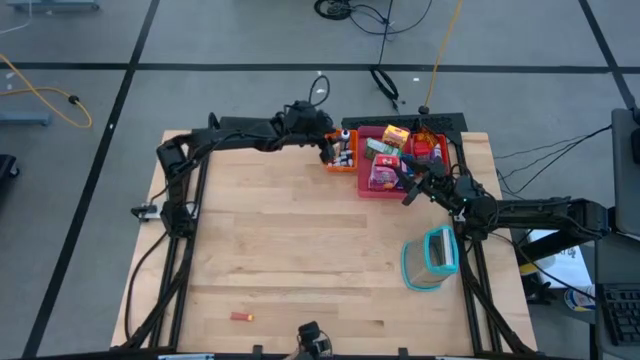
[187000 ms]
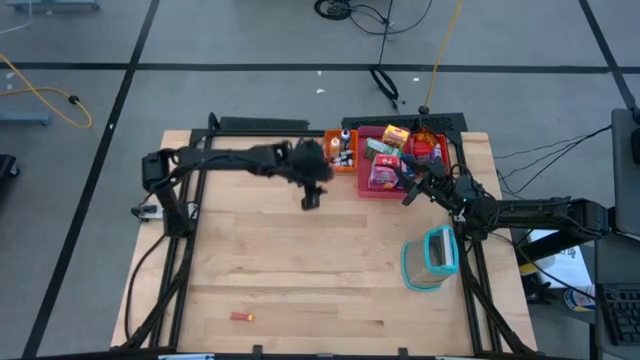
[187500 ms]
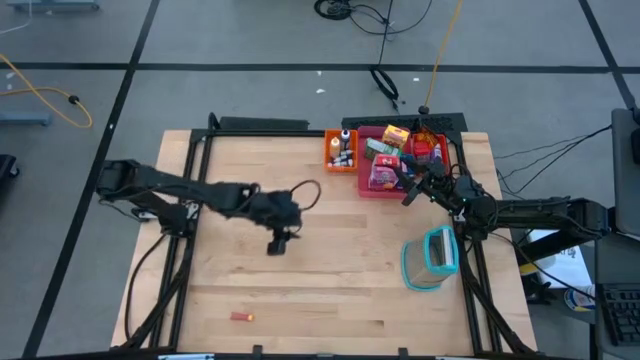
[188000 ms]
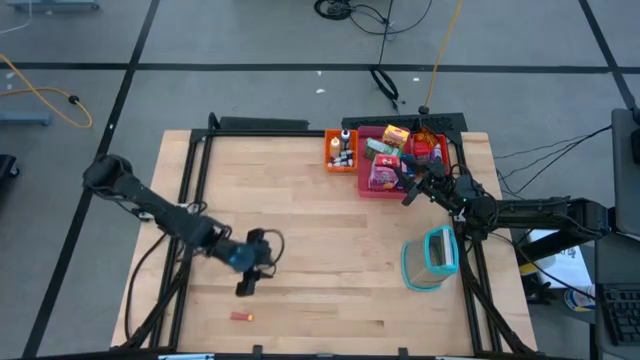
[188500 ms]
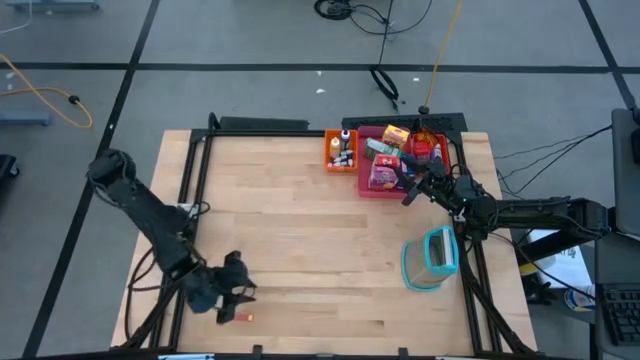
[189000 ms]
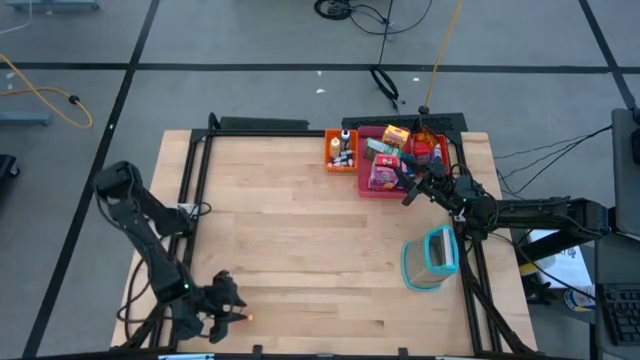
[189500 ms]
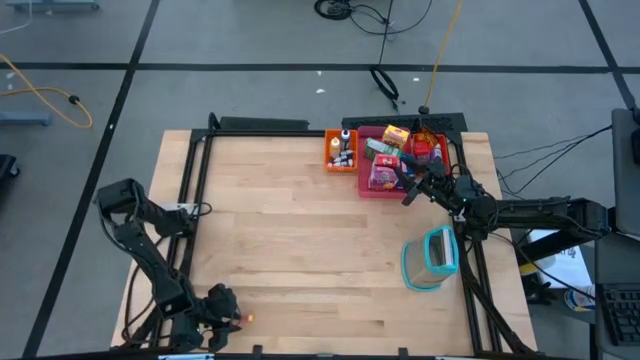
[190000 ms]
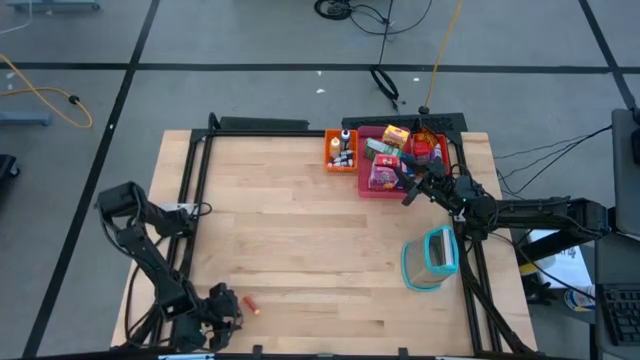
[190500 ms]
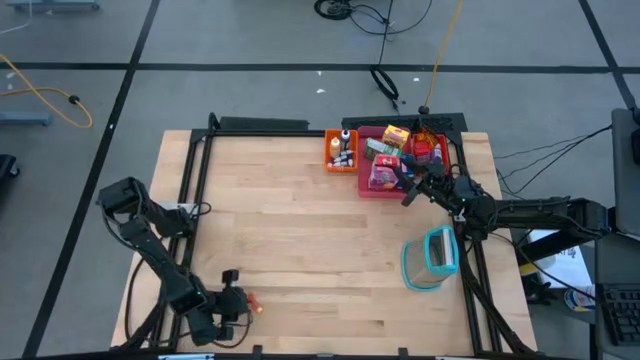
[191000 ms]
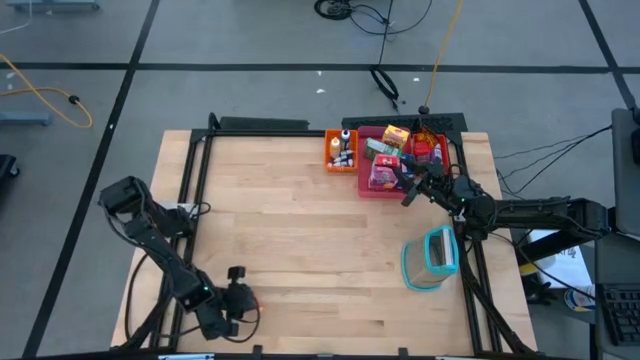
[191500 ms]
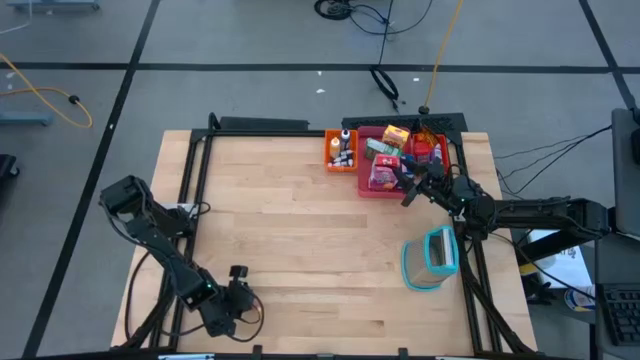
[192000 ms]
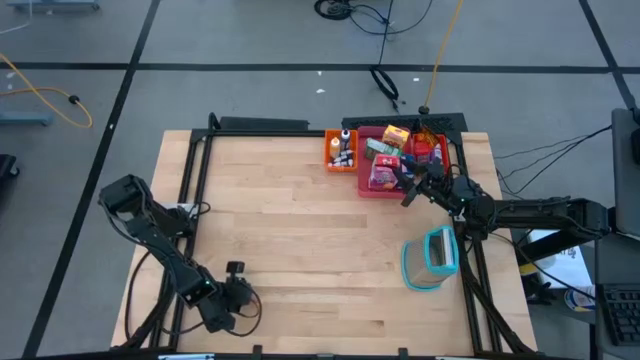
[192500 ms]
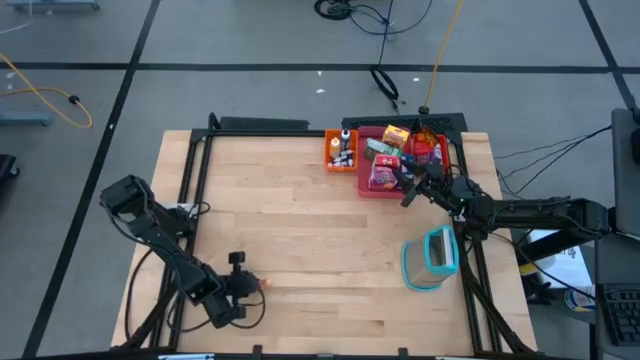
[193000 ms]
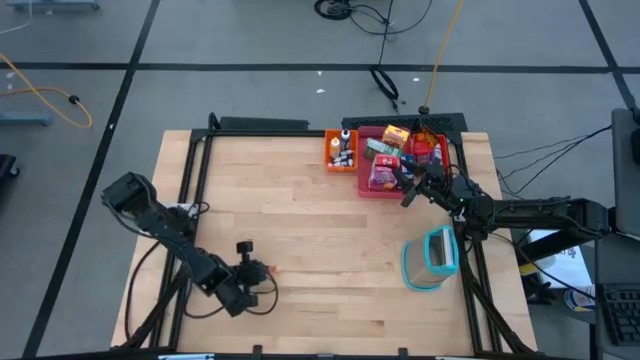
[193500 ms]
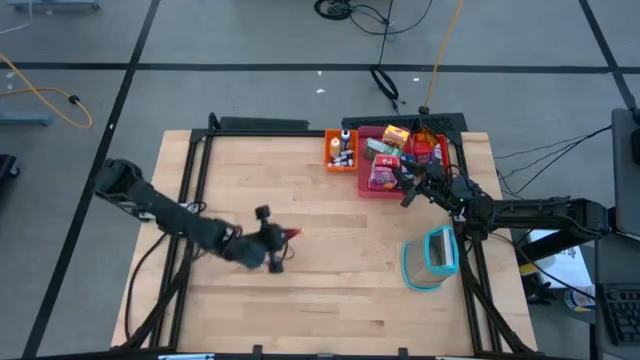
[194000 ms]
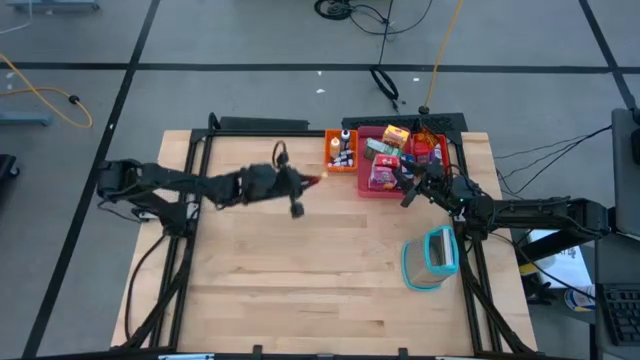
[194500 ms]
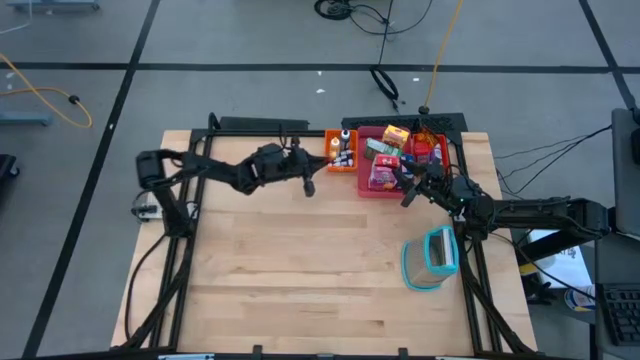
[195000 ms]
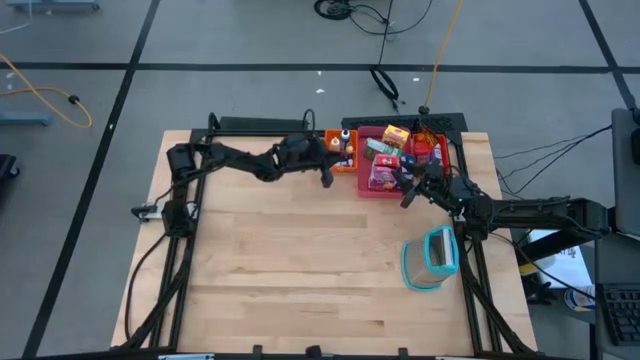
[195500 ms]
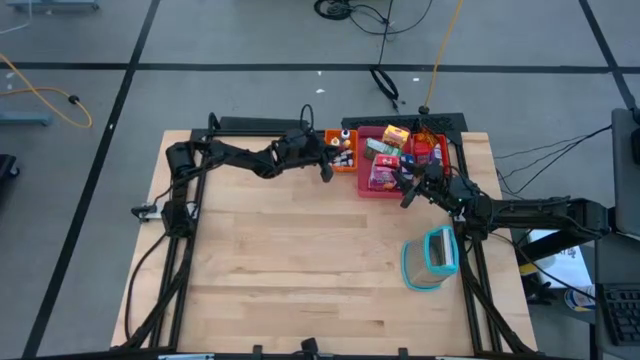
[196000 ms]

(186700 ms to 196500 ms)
Task: Pick & Place Kitchen Items
Put the red food coloring bottle into the orange bin

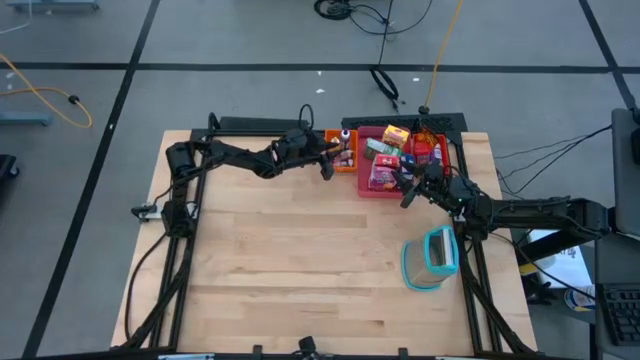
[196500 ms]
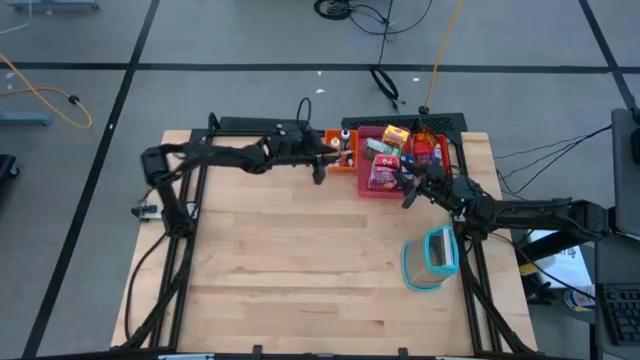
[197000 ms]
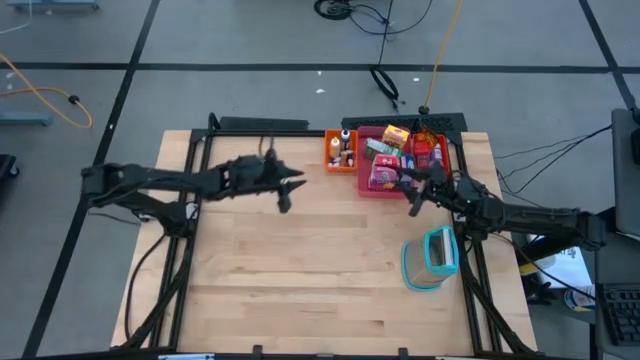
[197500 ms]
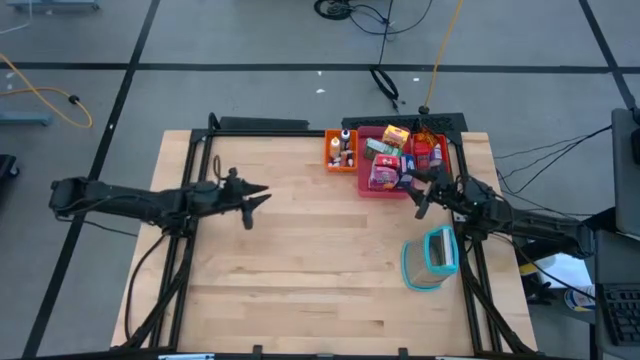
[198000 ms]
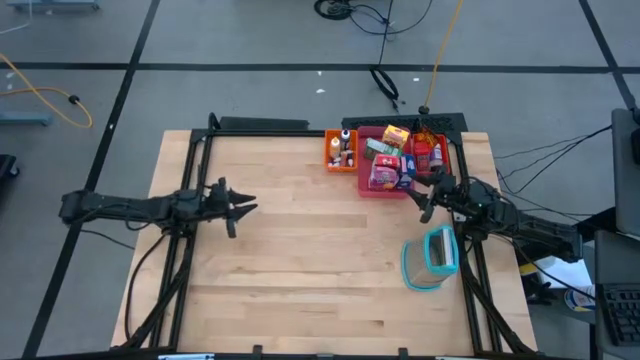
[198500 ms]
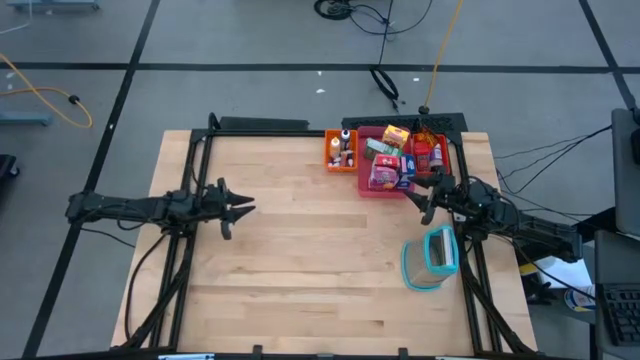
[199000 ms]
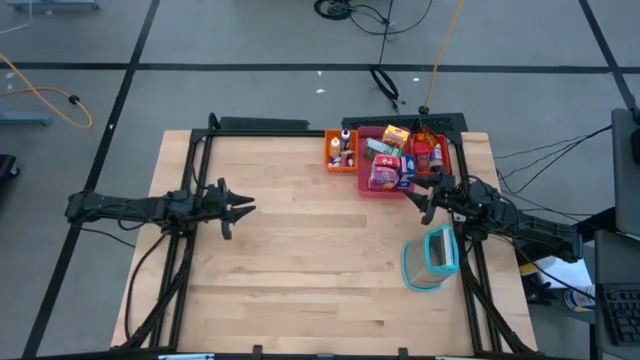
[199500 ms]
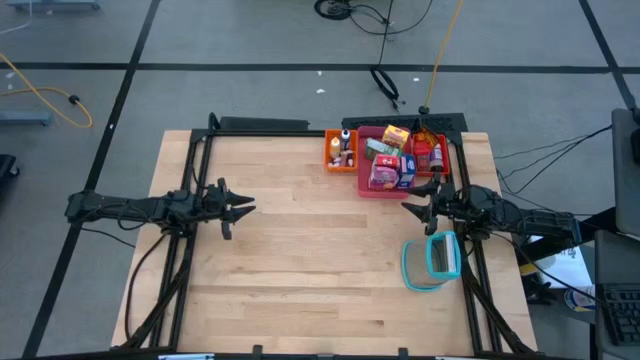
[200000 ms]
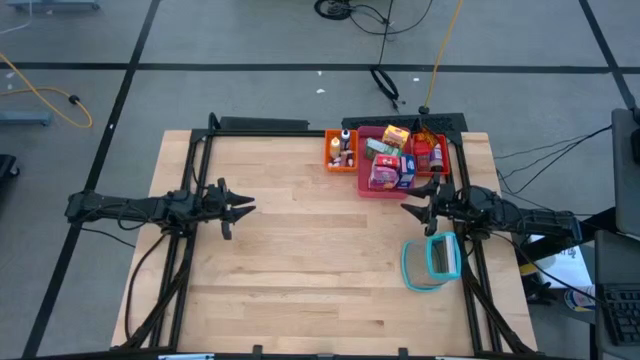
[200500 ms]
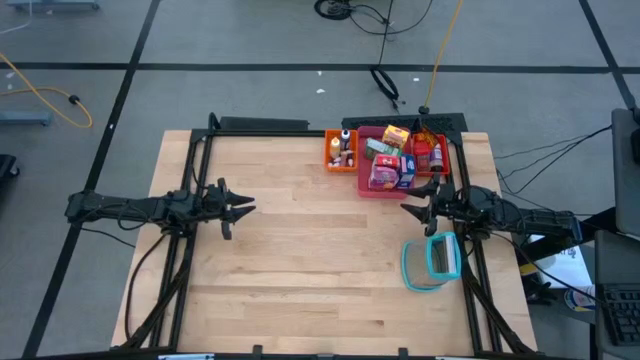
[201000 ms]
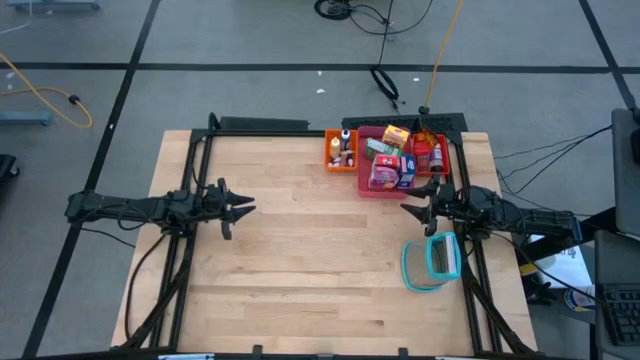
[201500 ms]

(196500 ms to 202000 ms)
Return to Home Position

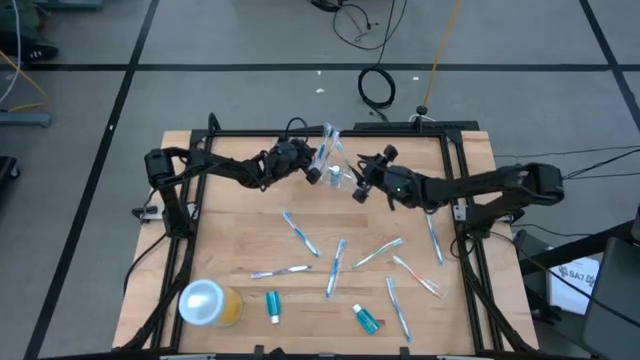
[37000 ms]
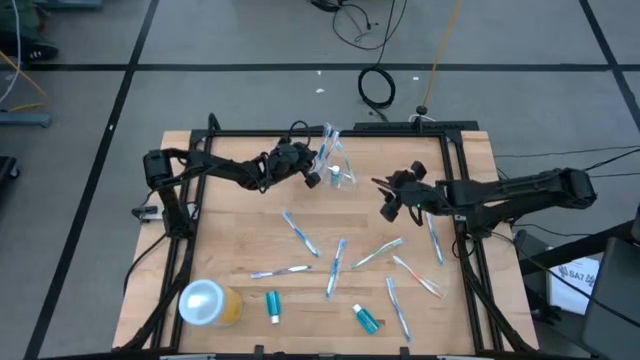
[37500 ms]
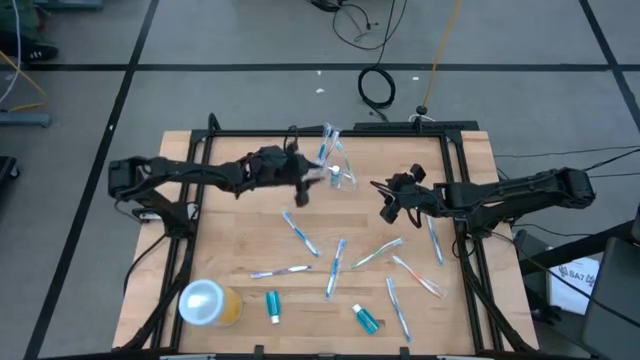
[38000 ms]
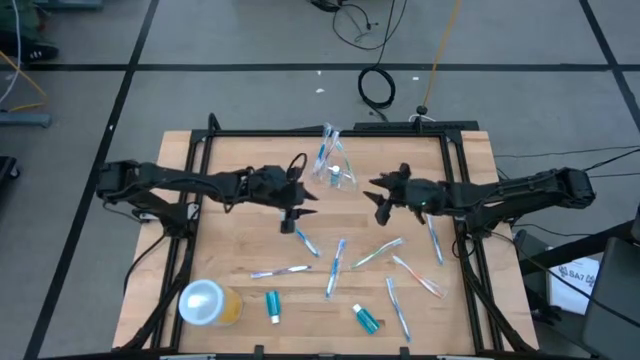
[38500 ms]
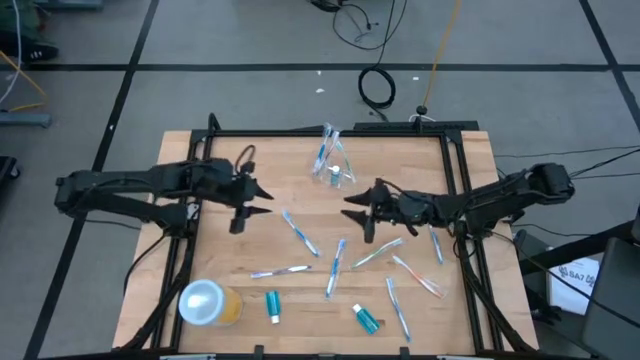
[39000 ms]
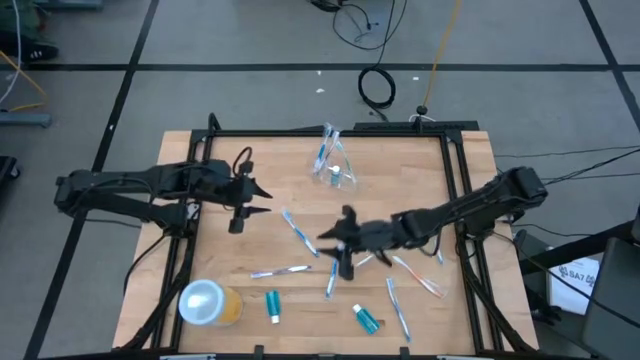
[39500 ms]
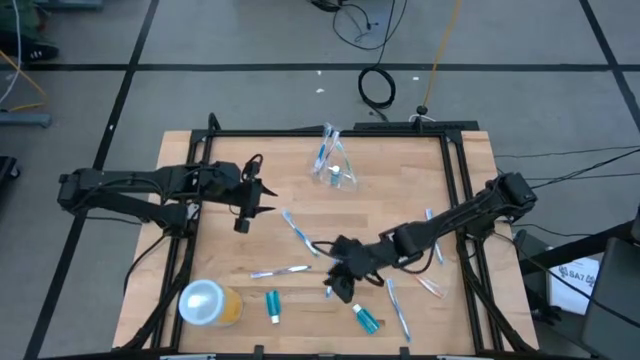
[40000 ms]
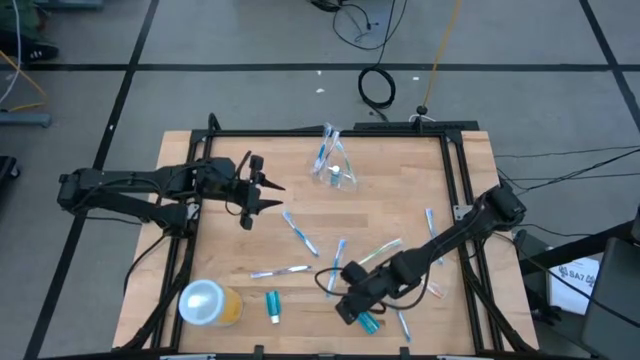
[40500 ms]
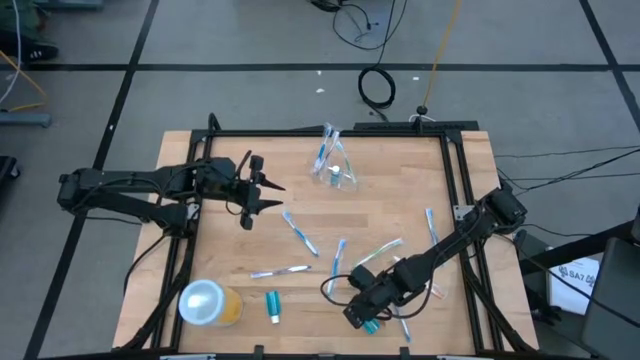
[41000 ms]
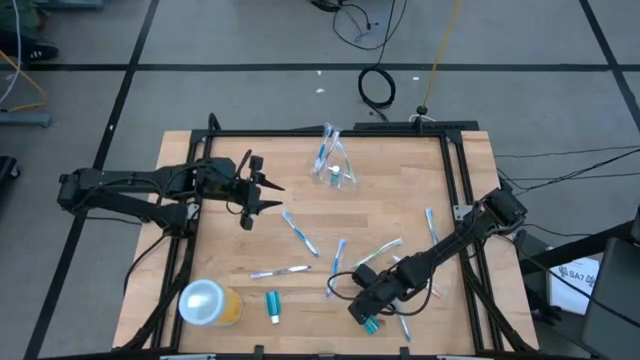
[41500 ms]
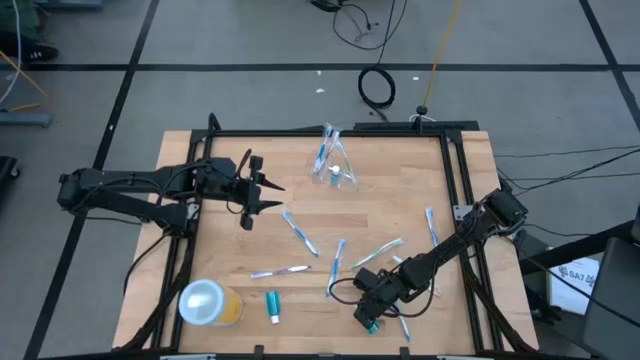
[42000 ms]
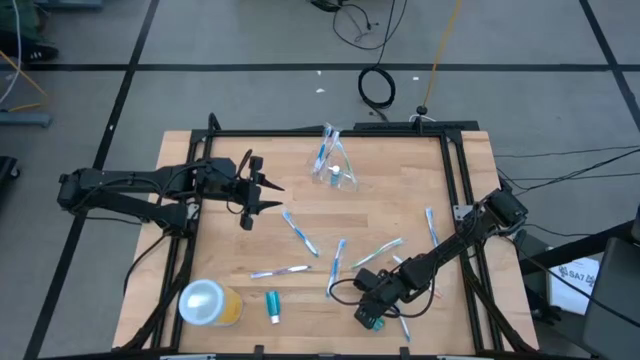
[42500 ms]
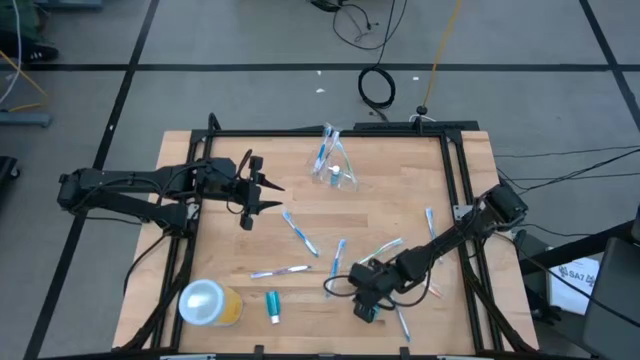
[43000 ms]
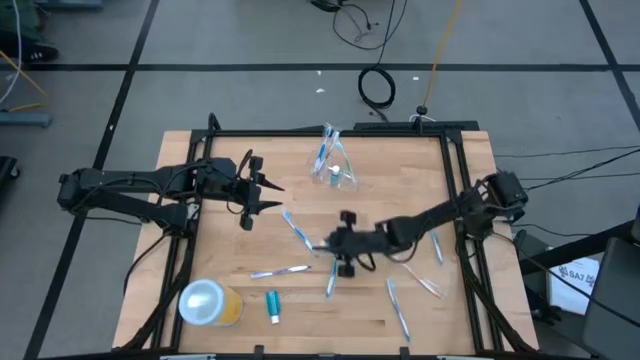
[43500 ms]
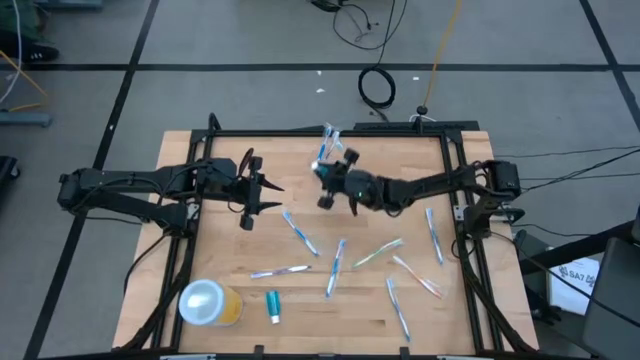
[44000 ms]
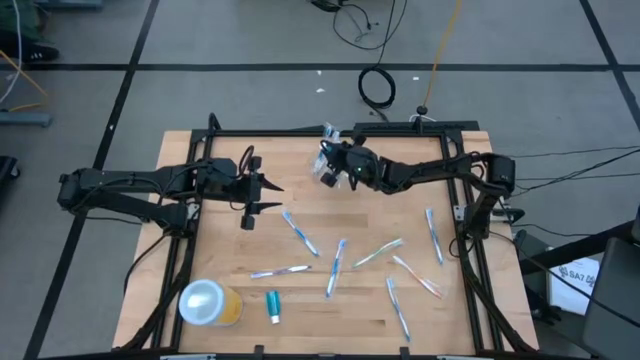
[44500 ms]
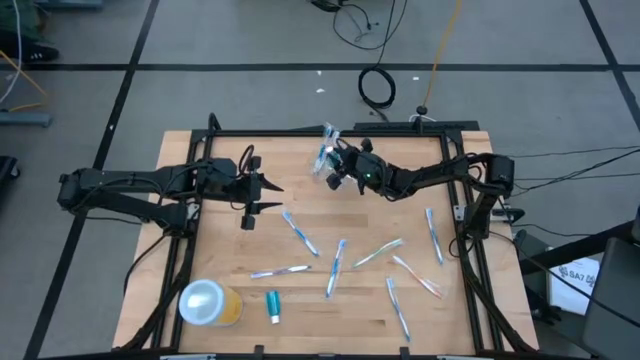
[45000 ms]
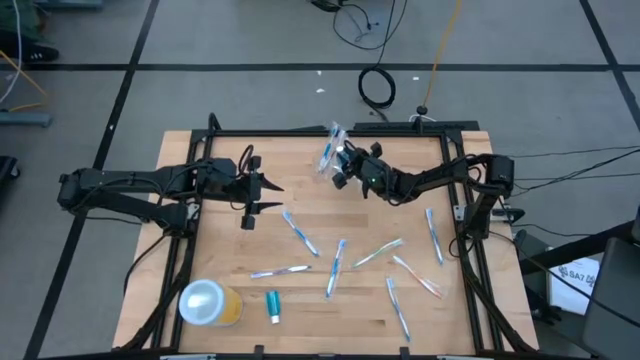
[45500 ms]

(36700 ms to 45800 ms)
Task: Pick & Place toothbrushing station
Put the right blue mouthwash into the transparent organizer
